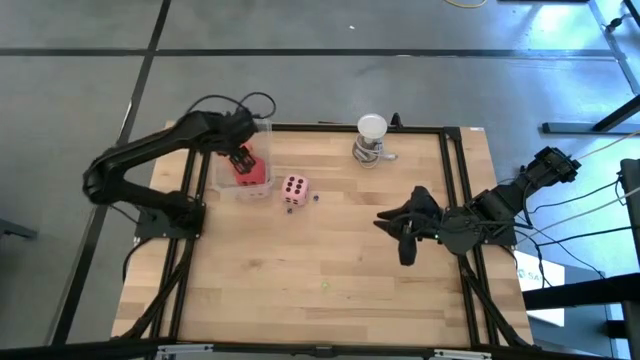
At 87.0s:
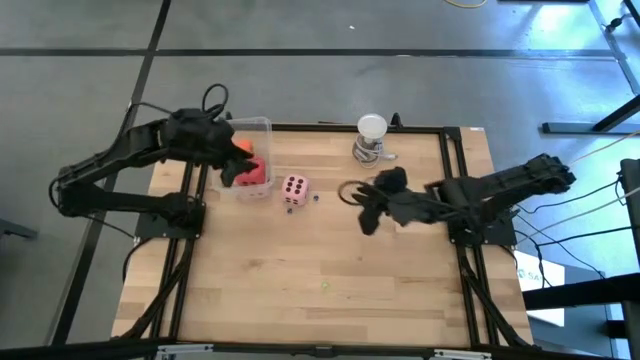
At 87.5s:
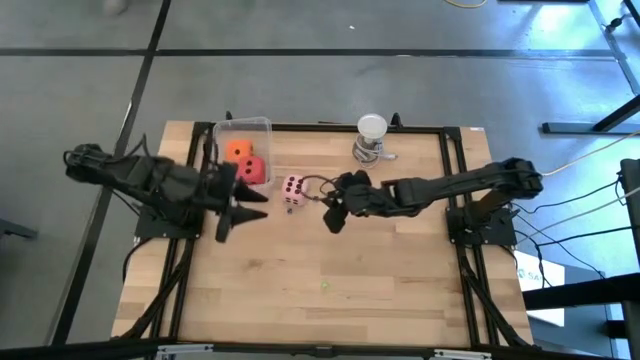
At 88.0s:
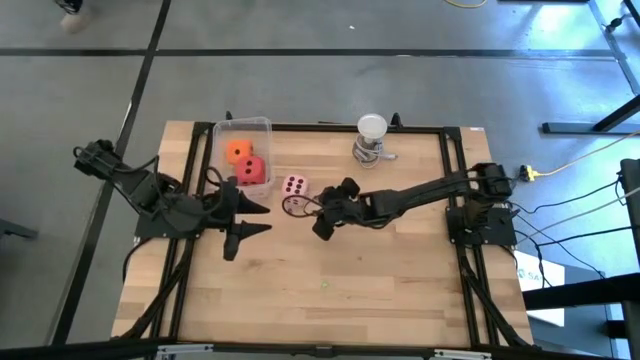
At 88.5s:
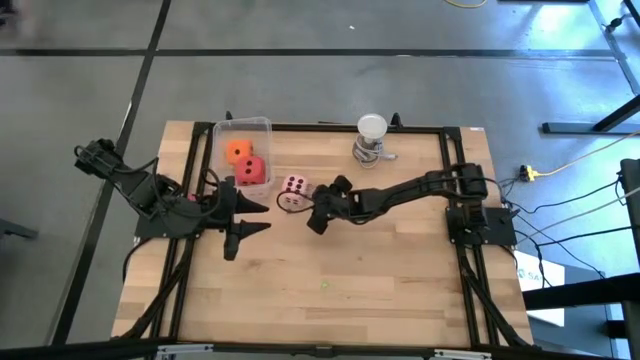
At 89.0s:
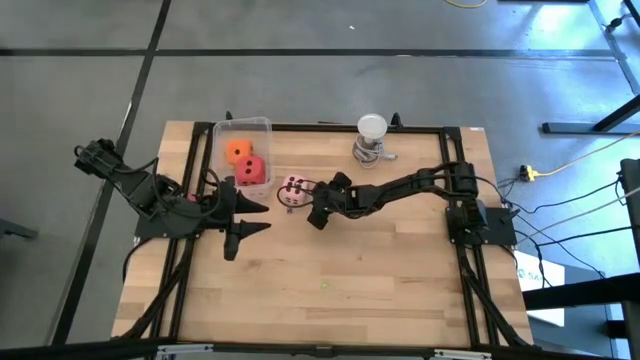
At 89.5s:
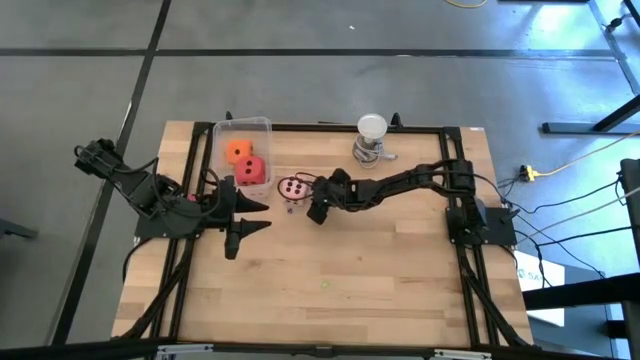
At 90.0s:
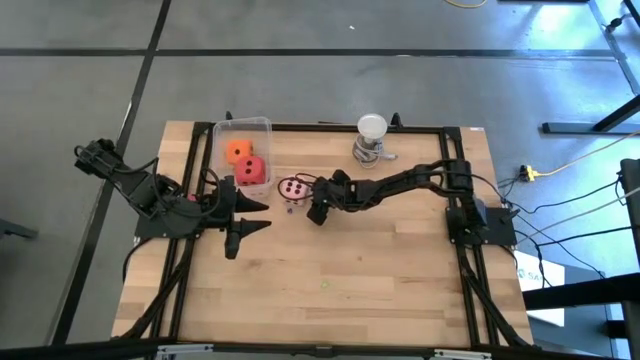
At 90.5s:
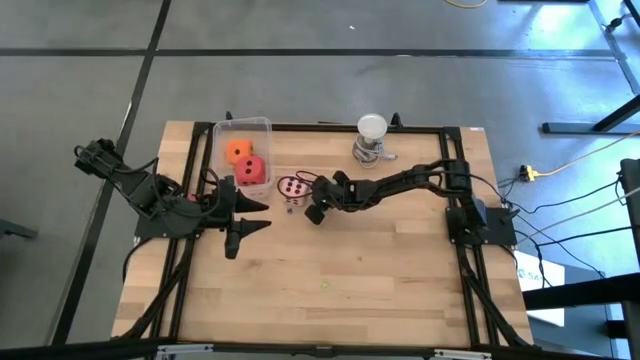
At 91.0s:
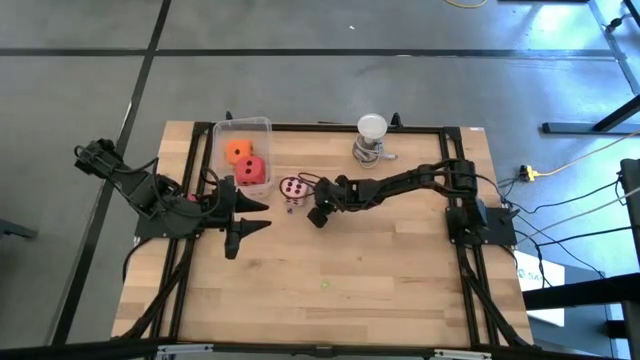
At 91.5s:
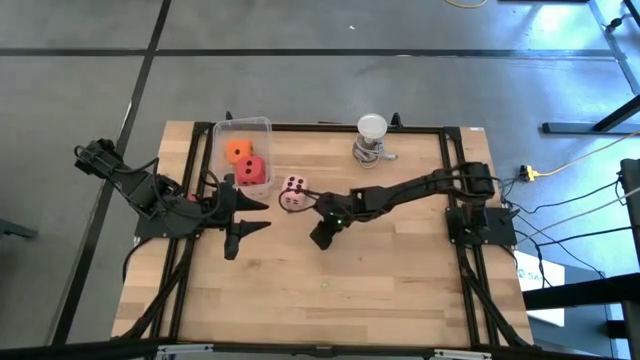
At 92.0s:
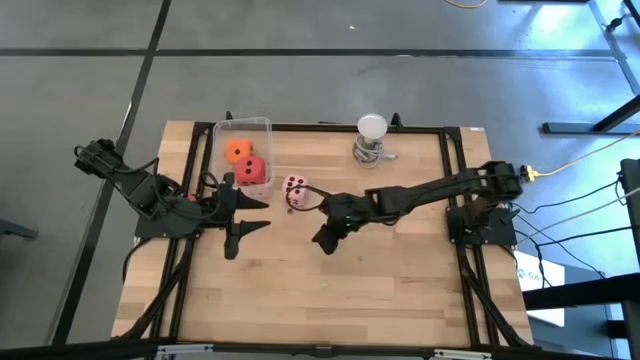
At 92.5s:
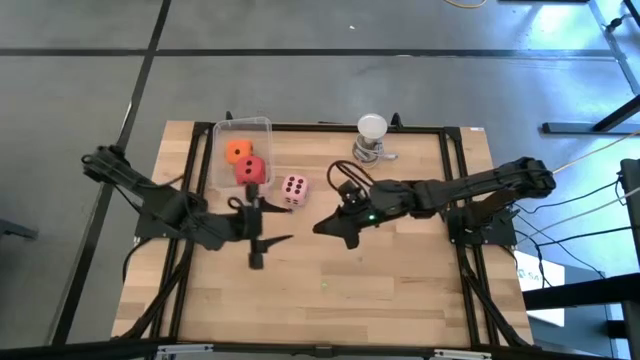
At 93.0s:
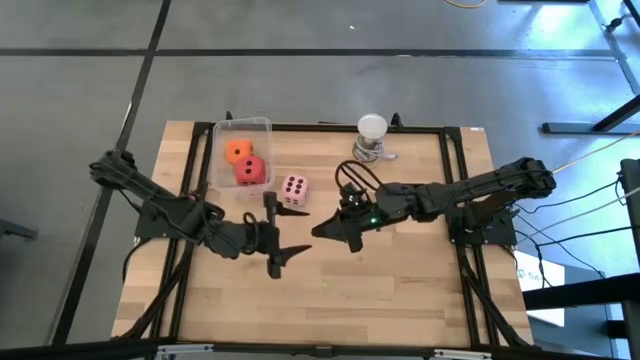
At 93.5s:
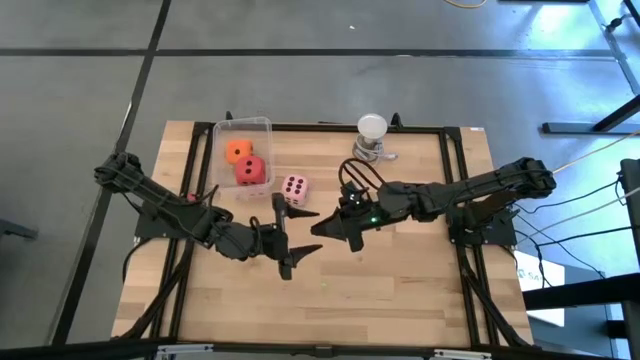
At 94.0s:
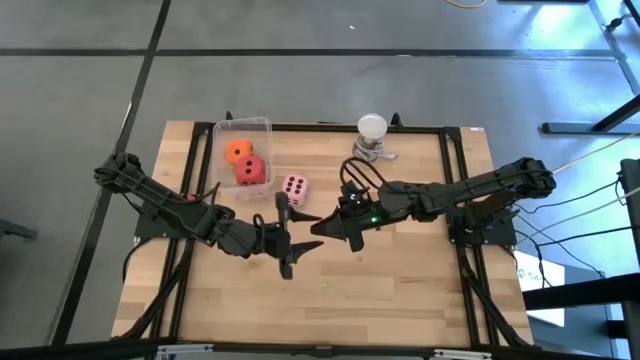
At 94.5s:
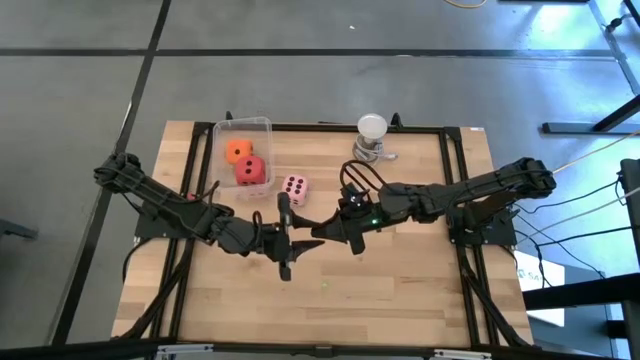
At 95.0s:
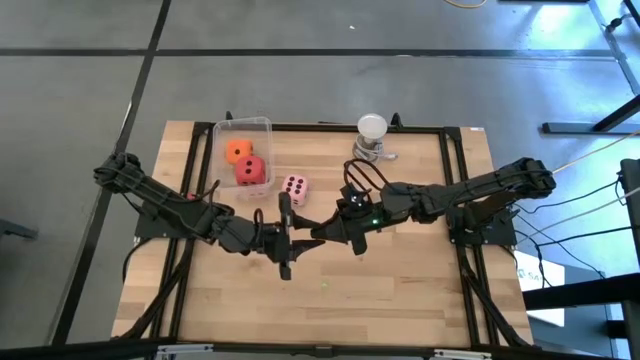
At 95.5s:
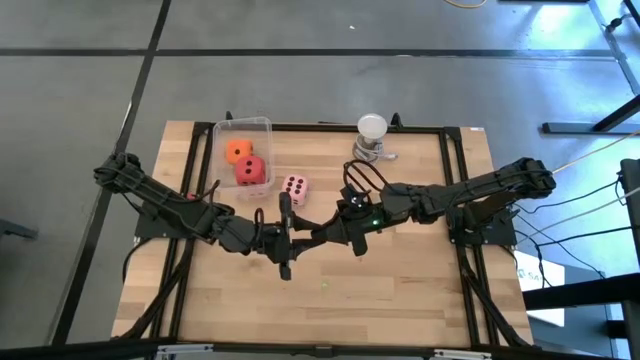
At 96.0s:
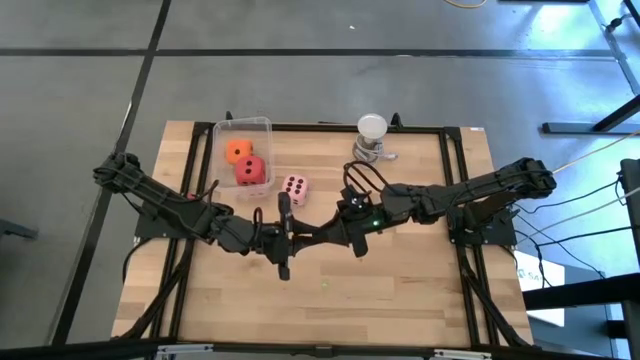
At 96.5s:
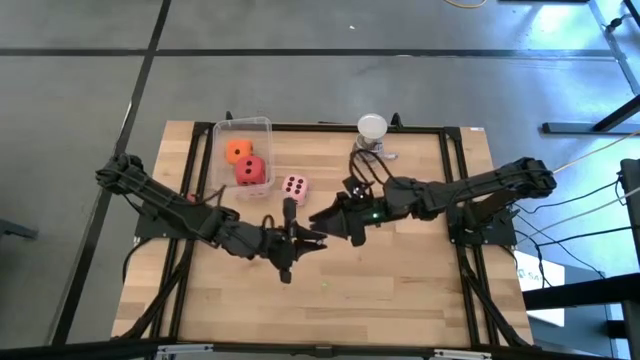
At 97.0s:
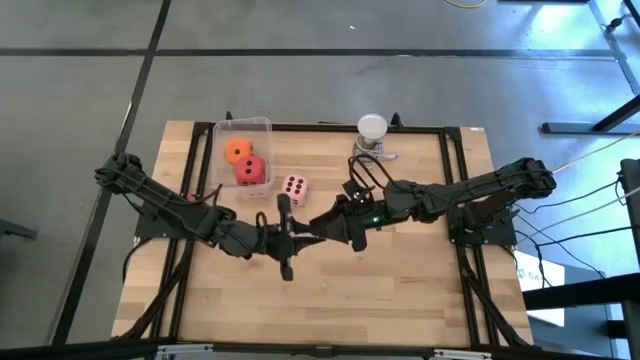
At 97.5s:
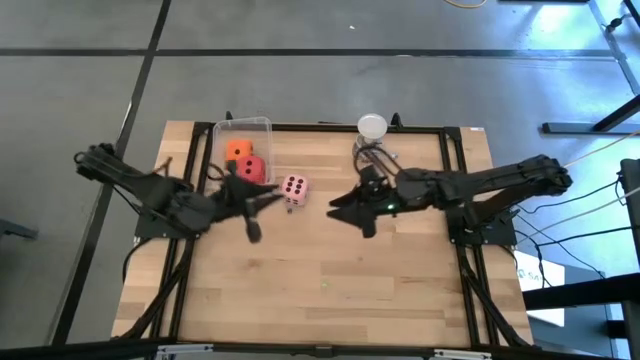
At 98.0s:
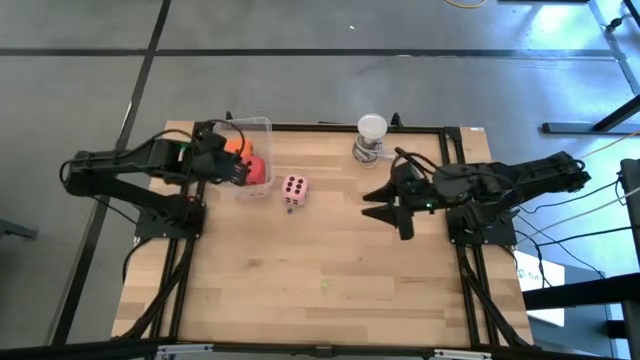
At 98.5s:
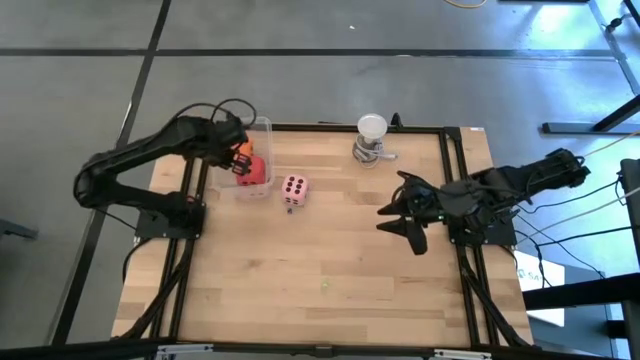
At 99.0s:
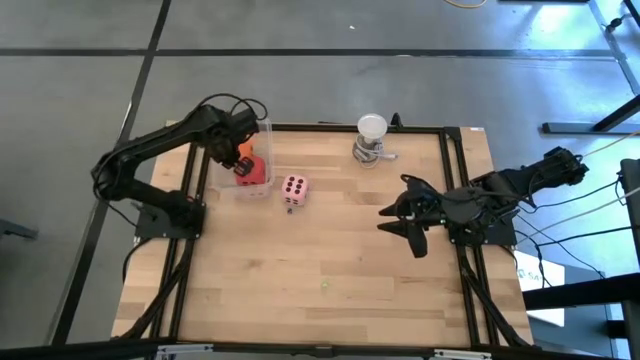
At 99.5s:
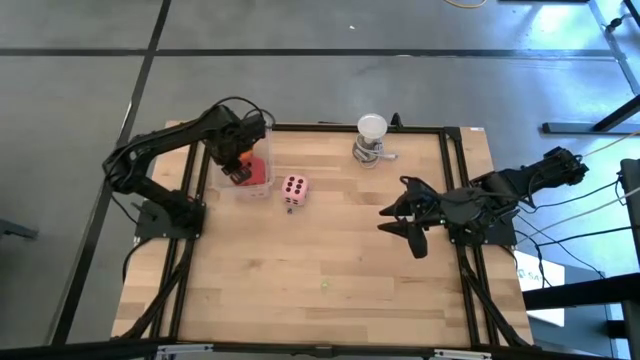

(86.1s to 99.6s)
Task: Pick & Place Dice
Put the small blue dice into the transparent bin

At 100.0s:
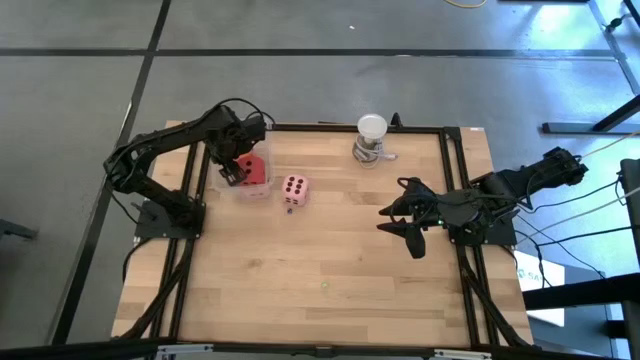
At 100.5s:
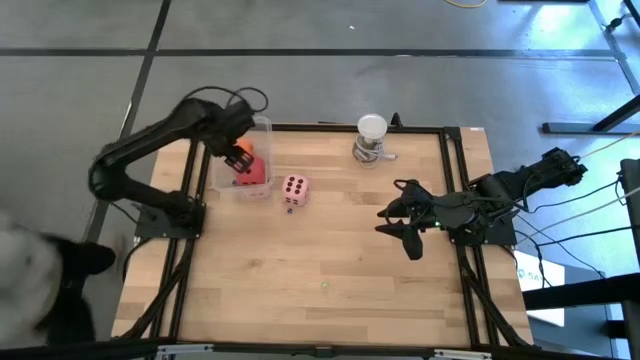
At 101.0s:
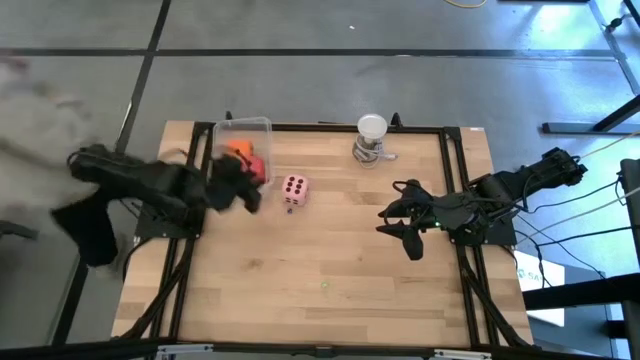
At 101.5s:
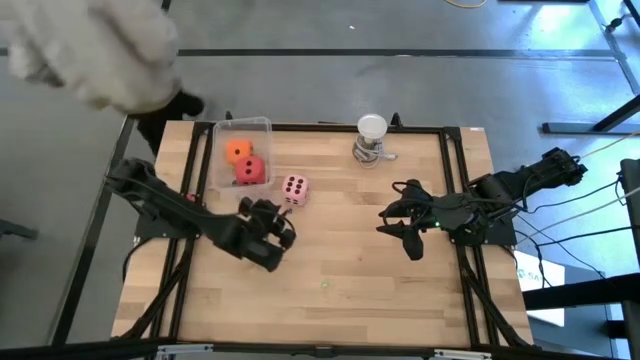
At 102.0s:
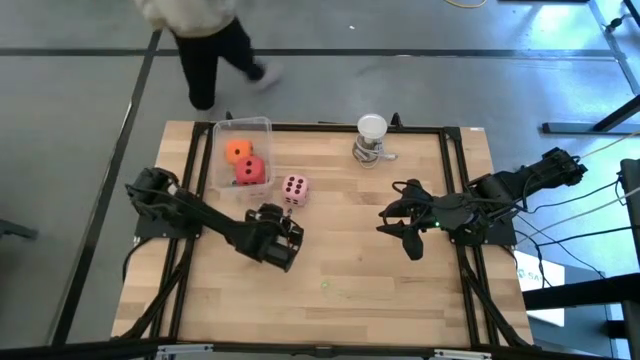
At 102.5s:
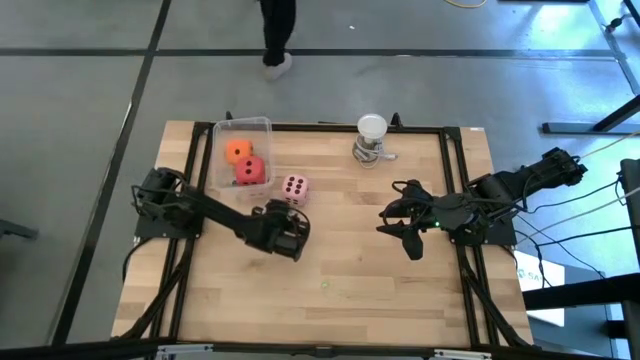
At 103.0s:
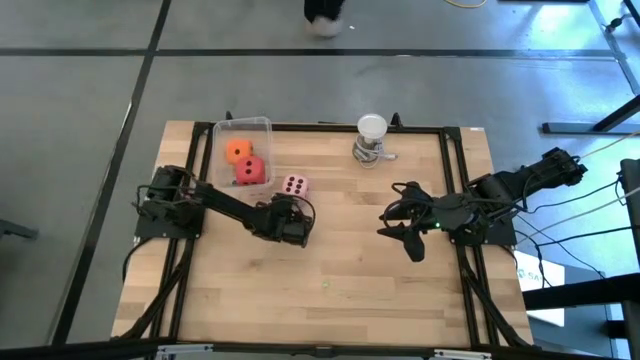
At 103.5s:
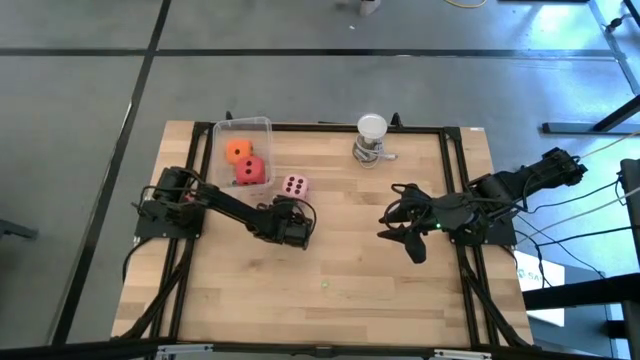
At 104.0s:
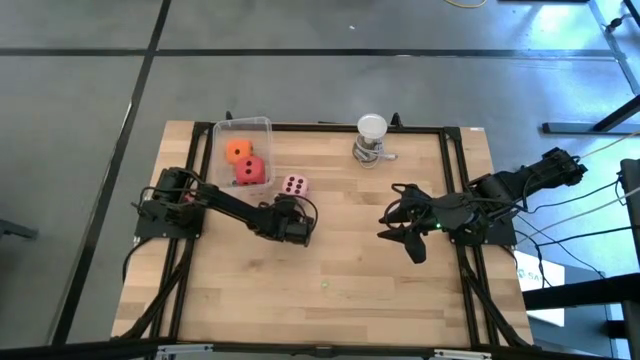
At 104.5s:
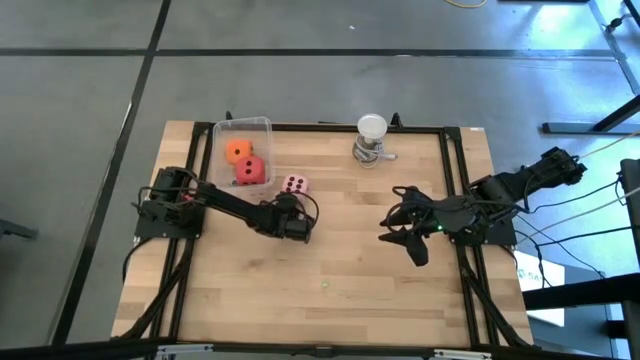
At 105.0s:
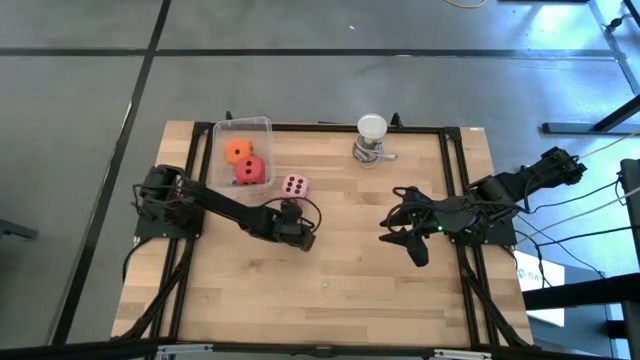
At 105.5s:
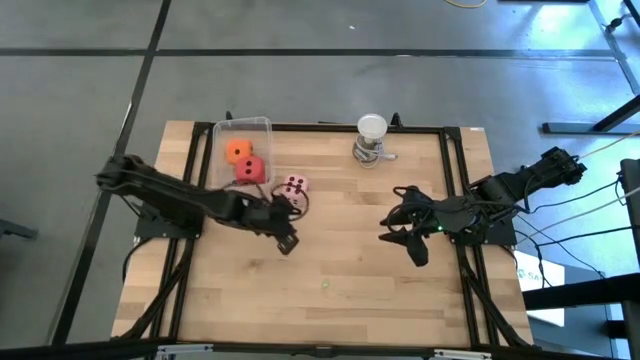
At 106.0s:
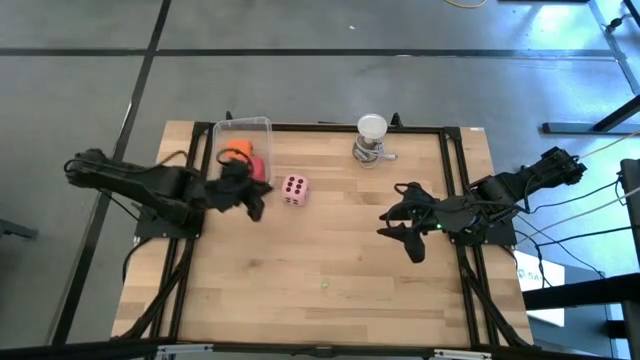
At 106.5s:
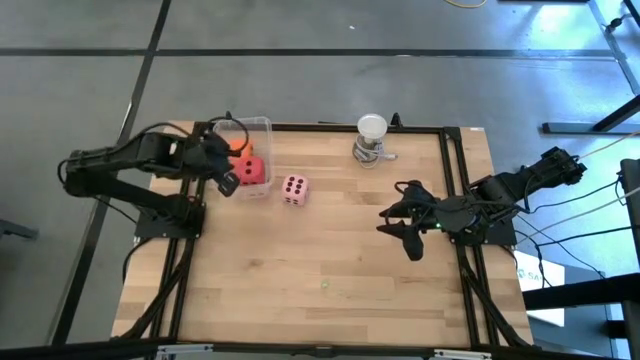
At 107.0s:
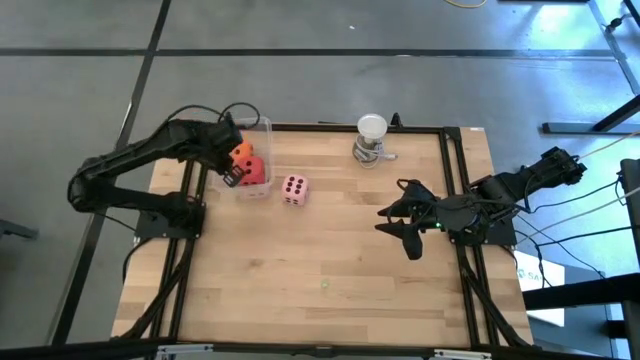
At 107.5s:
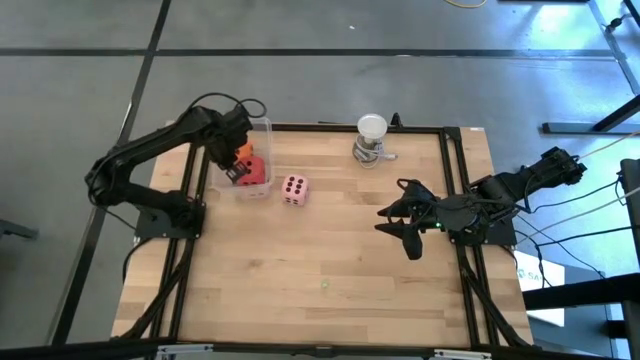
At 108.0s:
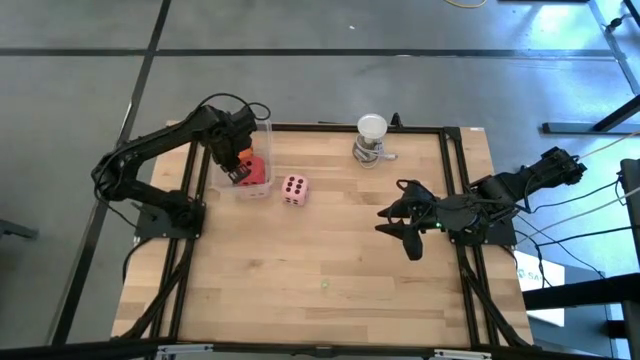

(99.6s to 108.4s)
Put the small blue dice into the transparent bin
